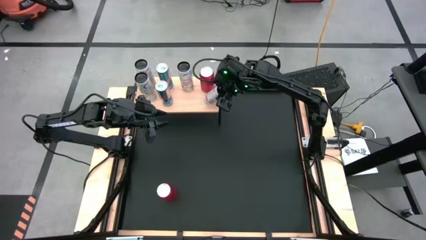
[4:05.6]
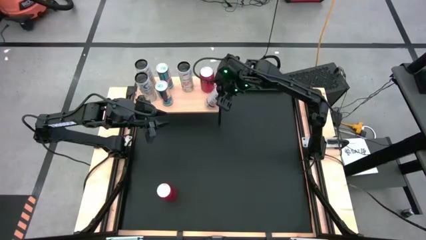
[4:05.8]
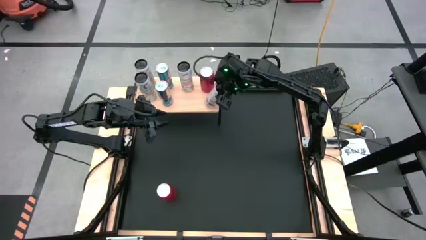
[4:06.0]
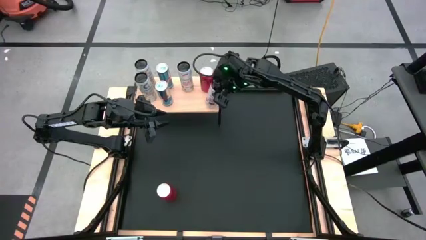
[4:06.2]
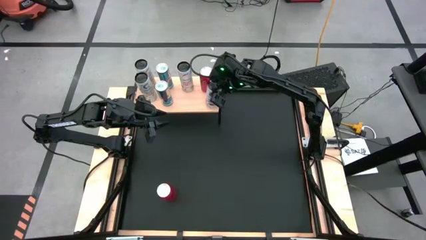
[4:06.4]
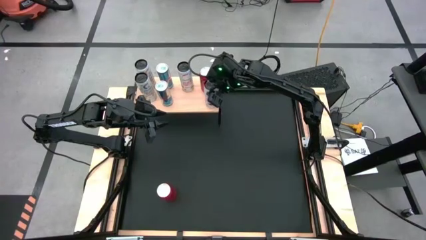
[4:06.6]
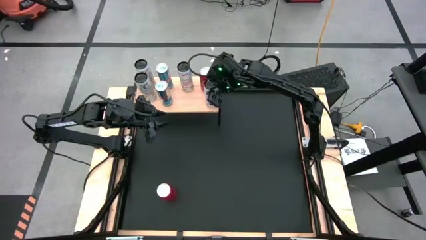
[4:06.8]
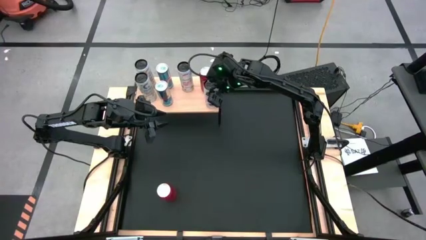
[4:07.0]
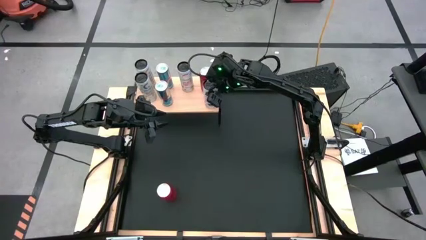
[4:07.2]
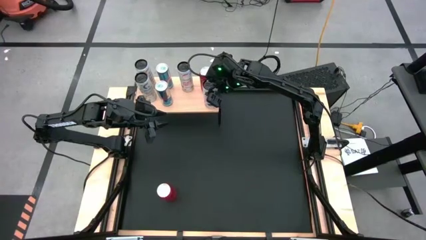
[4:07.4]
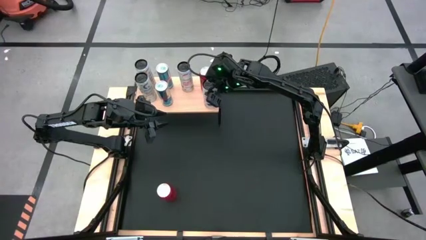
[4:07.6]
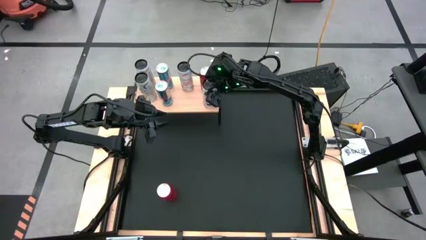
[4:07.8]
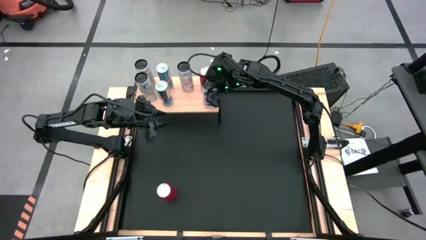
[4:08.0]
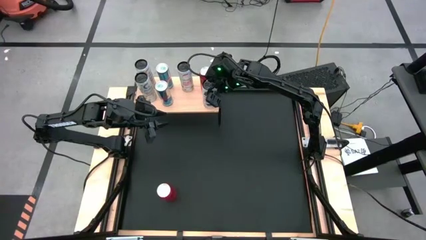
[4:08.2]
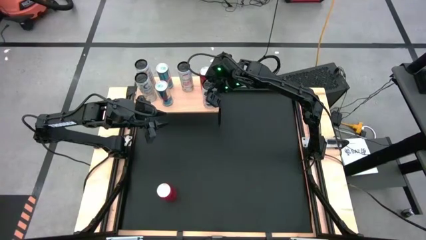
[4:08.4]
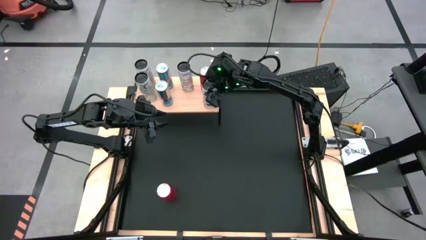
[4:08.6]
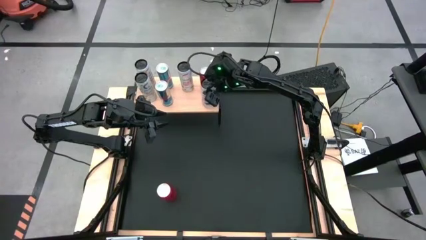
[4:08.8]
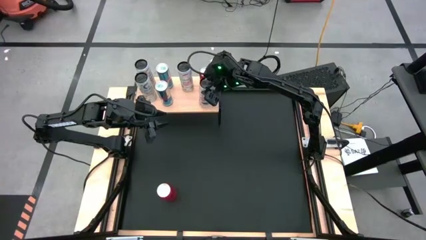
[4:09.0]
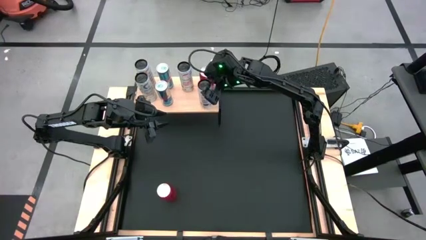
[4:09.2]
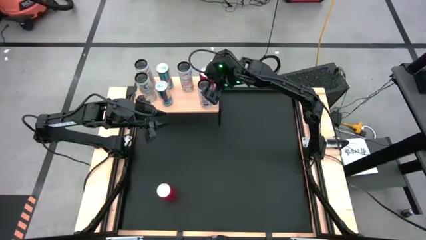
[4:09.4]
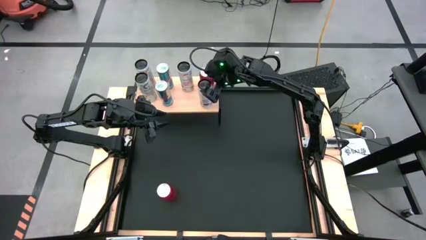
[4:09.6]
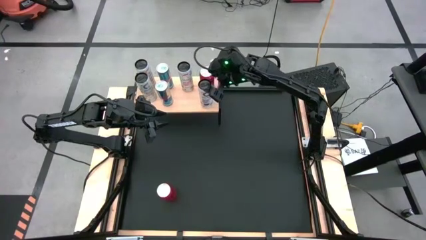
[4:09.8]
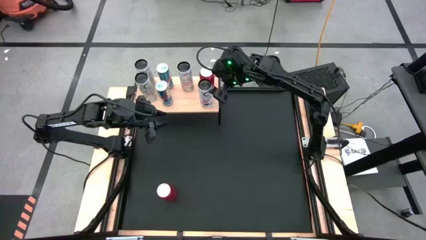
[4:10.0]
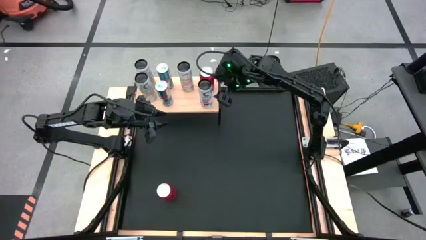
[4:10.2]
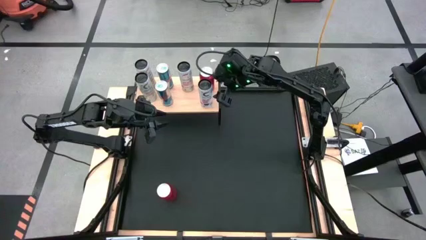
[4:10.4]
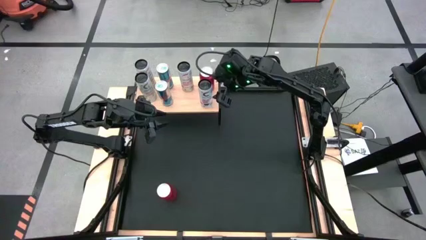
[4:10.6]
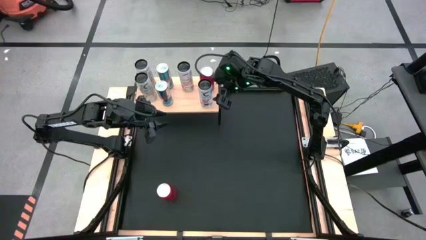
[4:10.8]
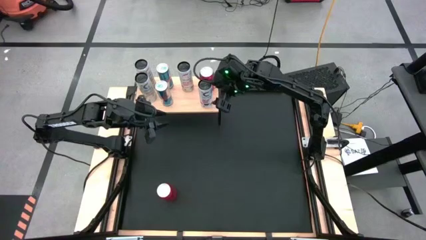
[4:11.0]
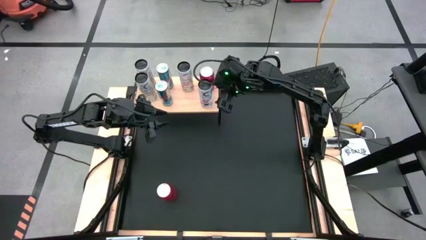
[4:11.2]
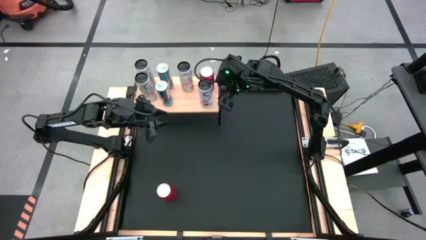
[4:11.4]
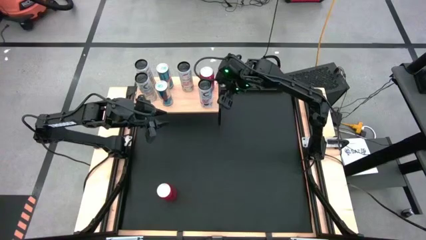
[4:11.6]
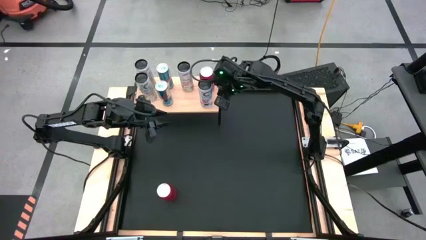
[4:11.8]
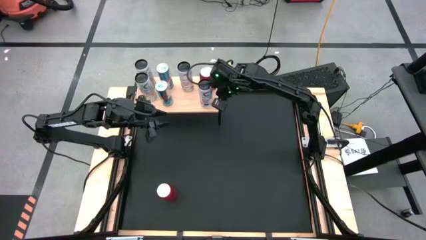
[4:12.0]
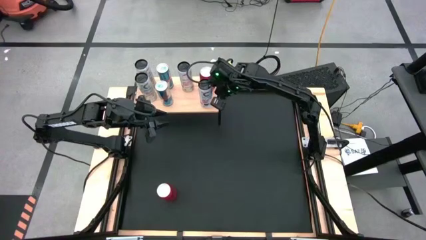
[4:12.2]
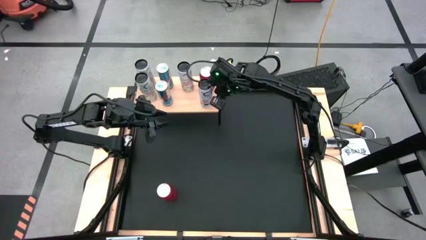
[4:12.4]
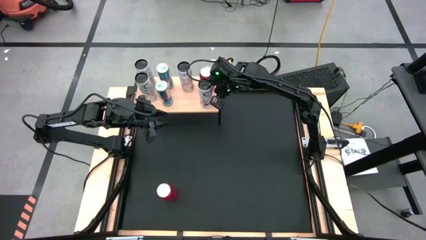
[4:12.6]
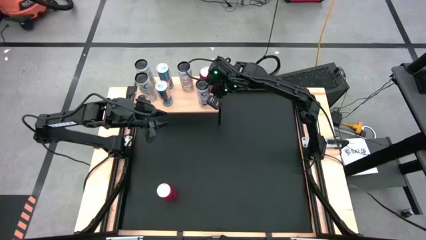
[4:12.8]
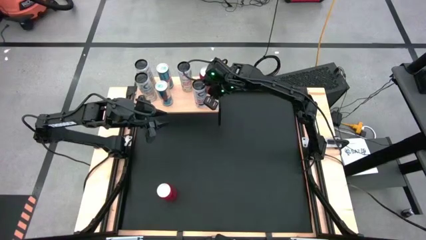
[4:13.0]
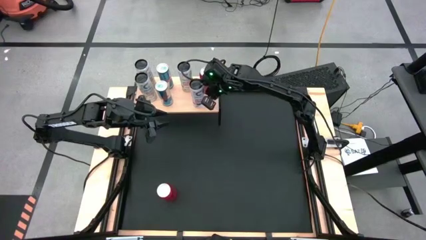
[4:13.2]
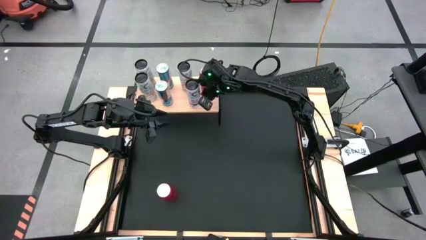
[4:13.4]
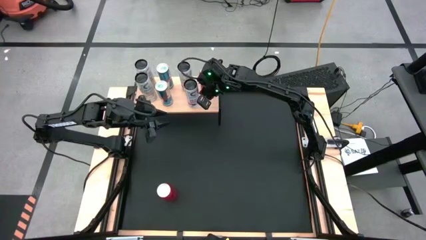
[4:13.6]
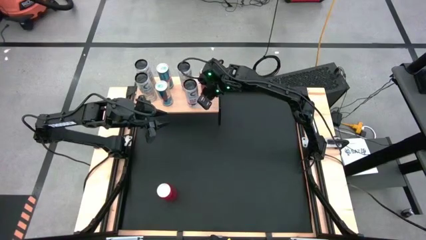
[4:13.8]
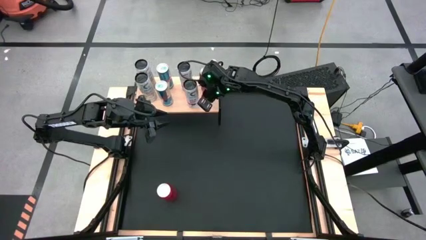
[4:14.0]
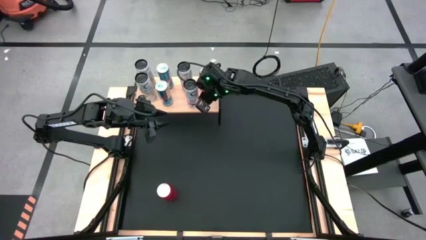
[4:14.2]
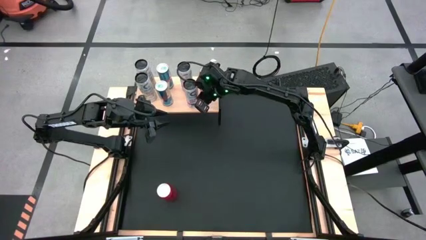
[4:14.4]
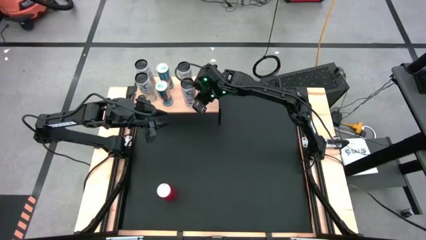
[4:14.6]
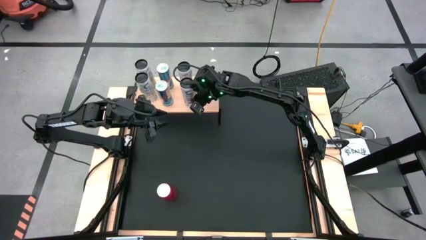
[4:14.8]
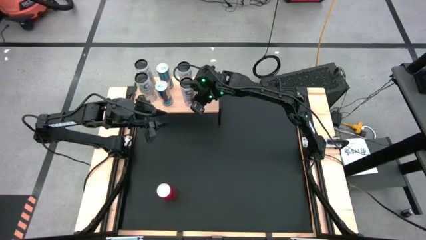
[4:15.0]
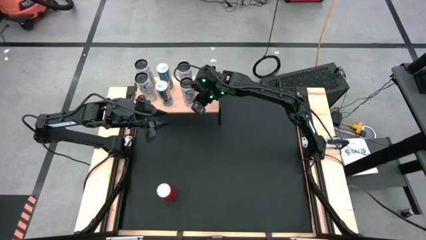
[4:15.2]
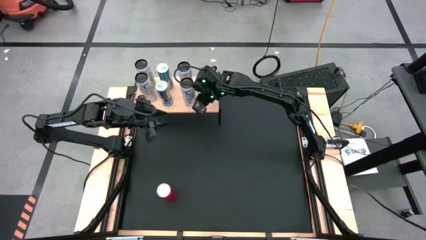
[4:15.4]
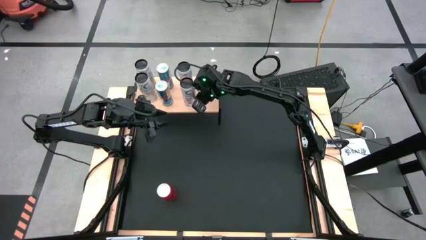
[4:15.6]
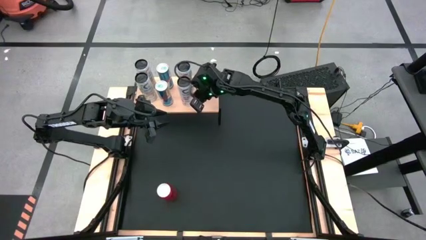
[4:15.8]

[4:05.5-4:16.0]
Task: Place canned beverage on shelf
Put the white pink soda can on the shelf aligned with the white pink soda can

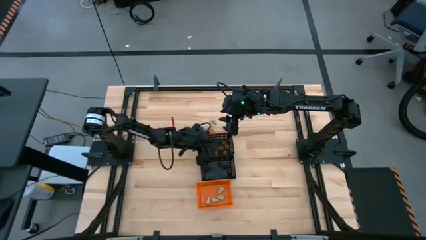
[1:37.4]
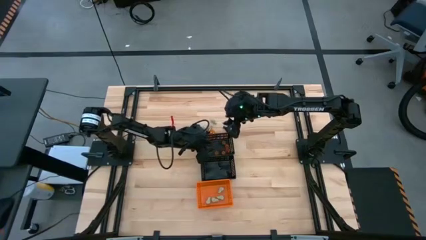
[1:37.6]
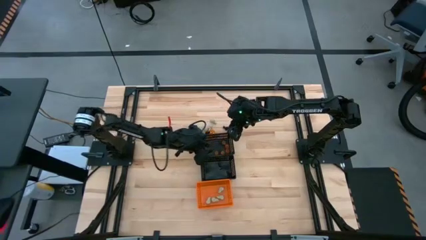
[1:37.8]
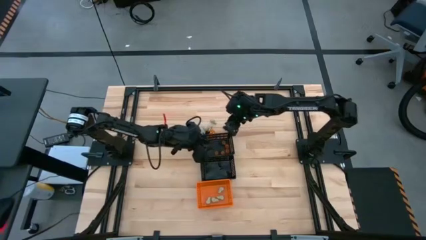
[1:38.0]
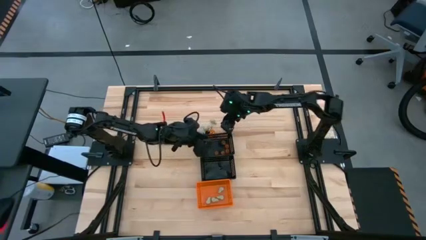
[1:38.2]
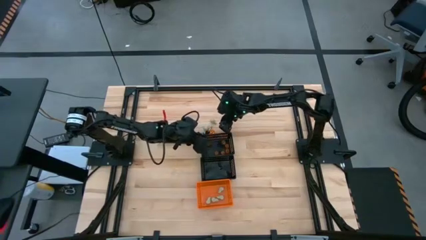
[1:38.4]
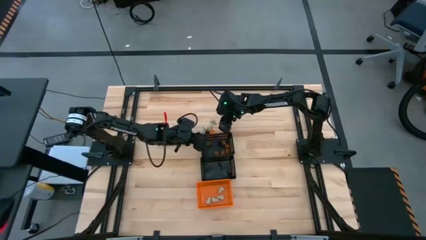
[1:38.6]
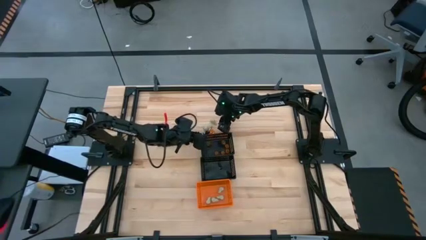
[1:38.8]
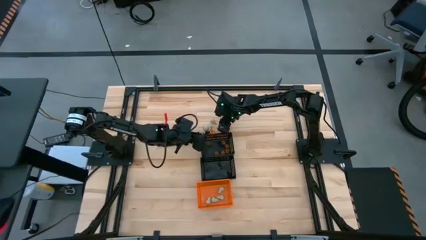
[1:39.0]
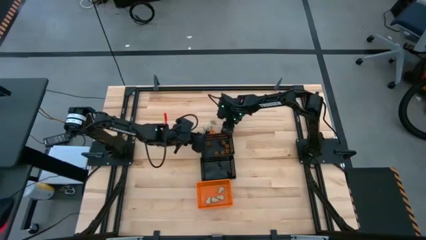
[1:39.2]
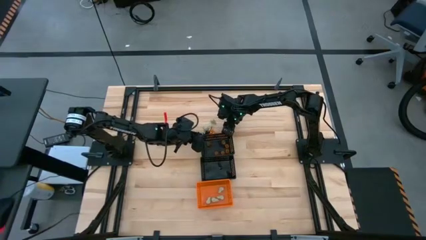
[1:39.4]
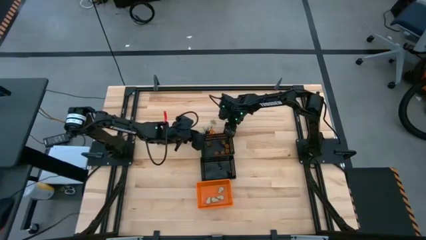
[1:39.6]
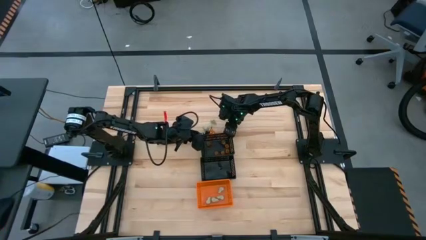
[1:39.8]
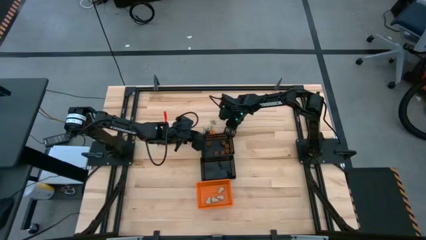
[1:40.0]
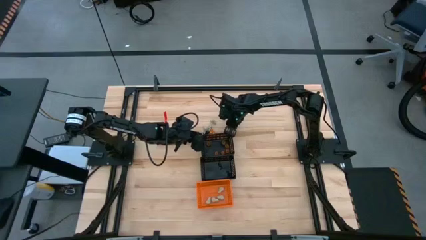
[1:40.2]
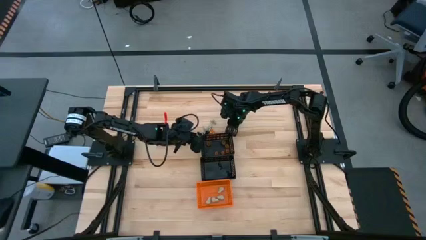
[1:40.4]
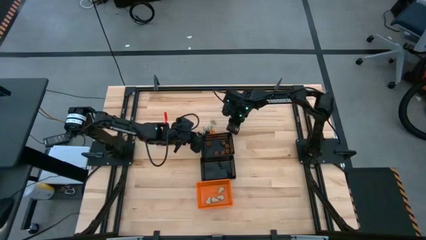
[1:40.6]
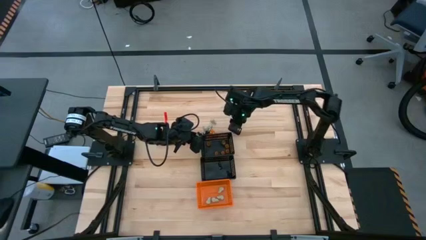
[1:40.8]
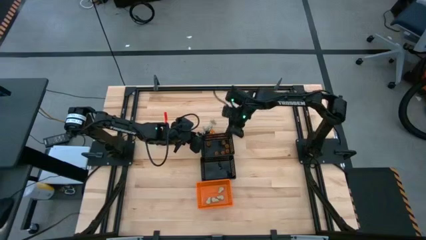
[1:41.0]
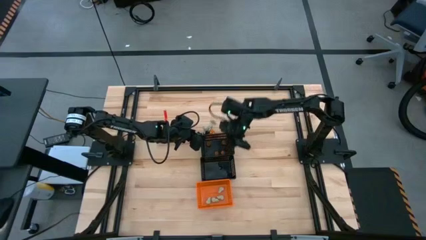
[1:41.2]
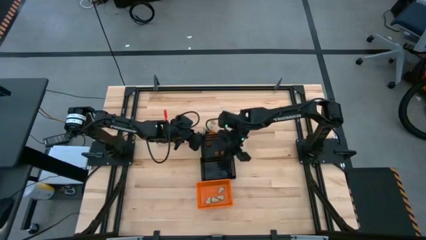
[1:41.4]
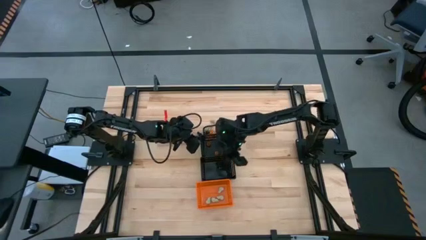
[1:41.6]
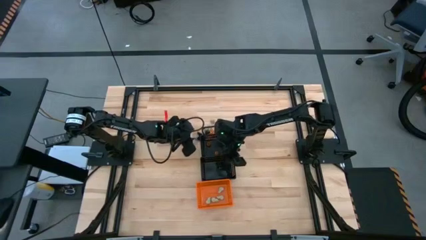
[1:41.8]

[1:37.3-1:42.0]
Task: Sort Halloween decoration
Put the black skeleton toy into the bottom black bin

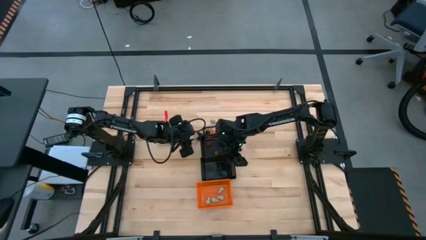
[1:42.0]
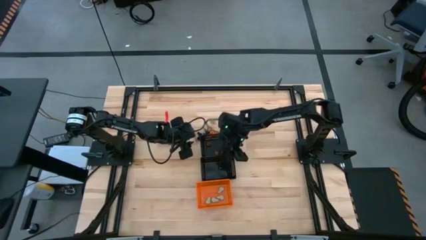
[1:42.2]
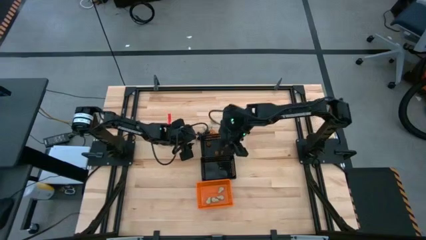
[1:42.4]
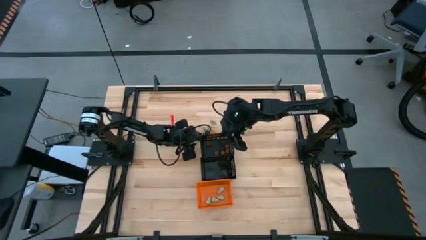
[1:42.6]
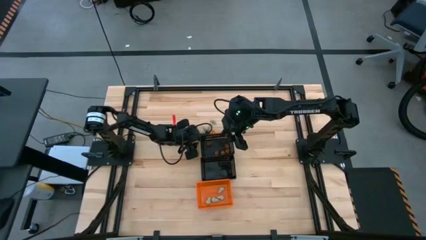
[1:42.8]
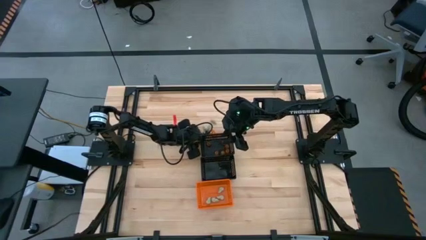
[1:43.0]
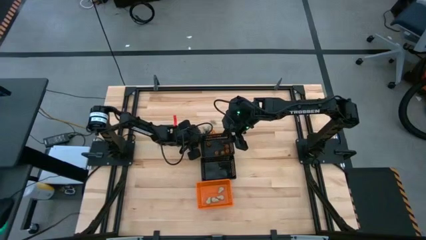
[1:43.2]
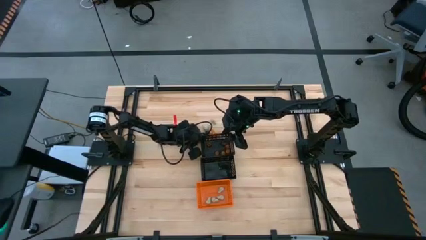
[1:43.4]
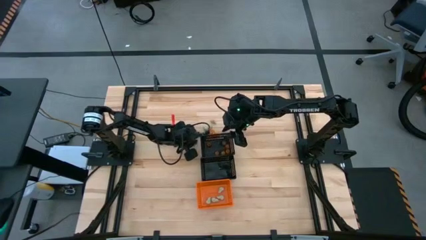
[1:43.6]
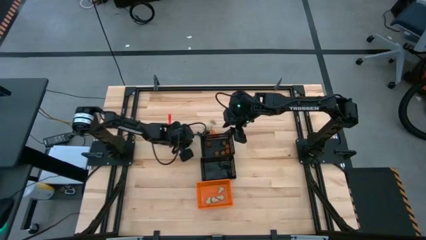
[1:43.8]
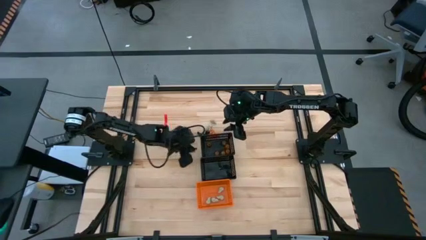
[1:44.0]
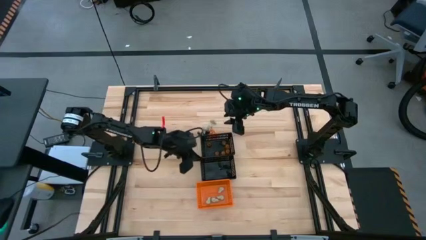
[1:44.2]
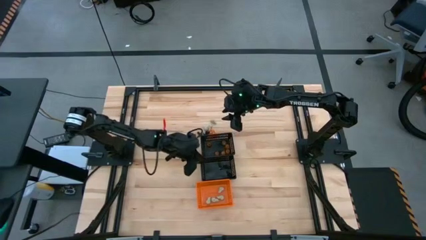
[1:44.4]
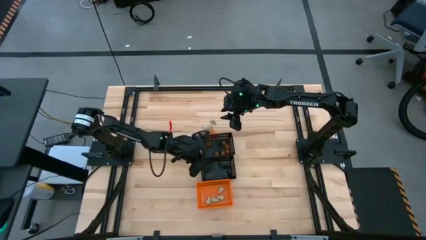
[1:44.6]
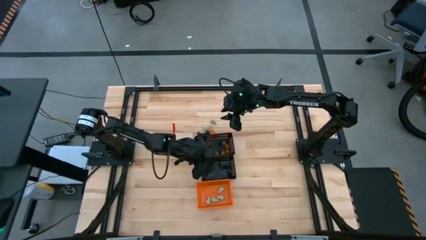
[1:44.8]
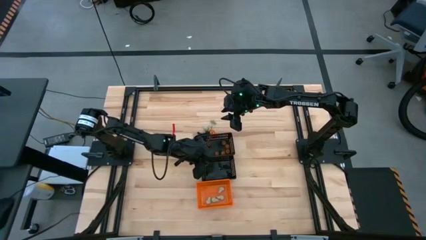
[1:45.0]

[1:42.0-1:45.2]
Put the black skeleton toy into the bottom black bin
